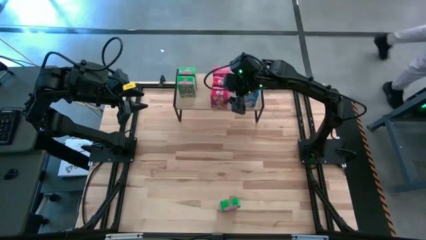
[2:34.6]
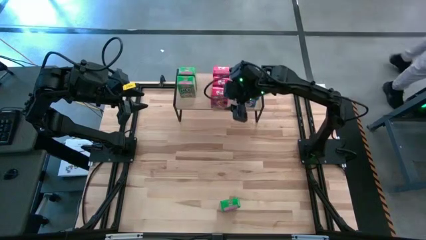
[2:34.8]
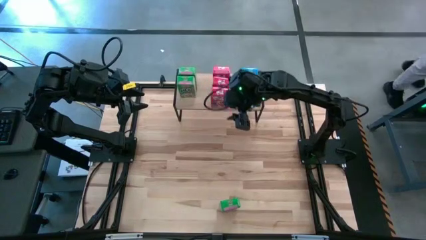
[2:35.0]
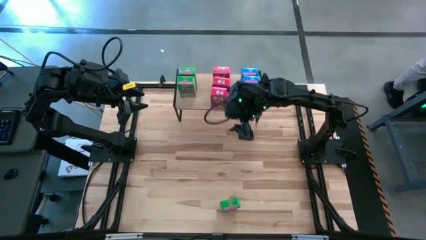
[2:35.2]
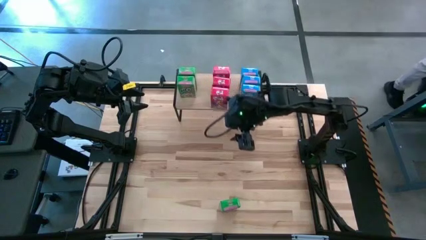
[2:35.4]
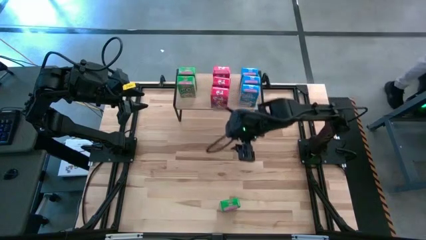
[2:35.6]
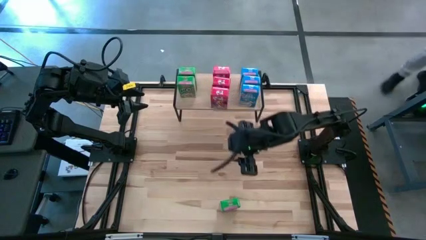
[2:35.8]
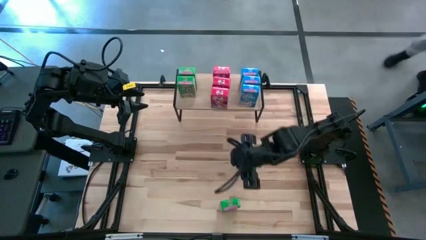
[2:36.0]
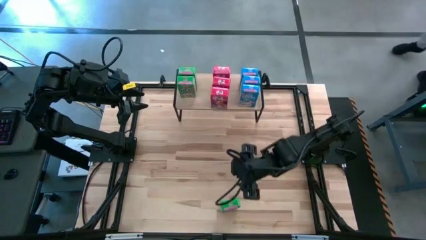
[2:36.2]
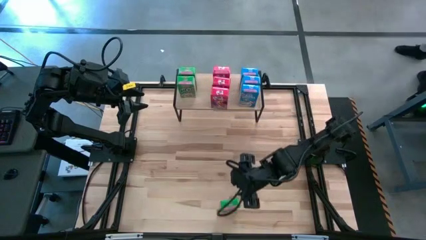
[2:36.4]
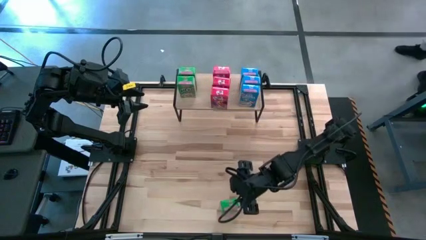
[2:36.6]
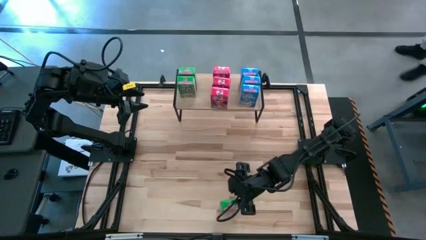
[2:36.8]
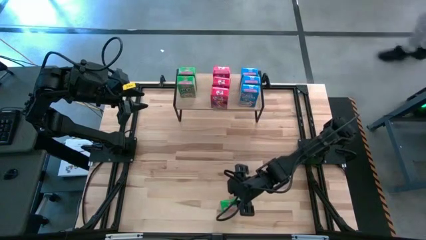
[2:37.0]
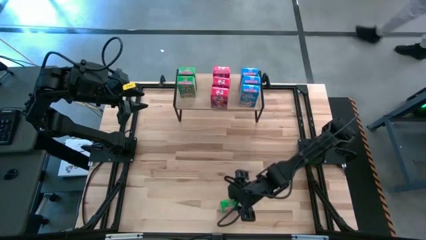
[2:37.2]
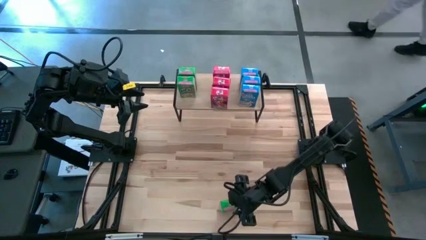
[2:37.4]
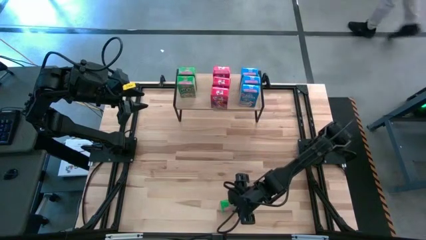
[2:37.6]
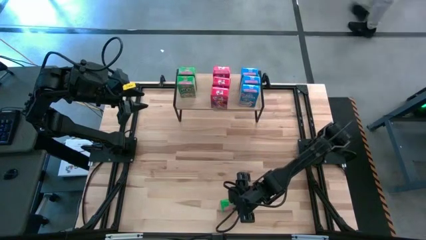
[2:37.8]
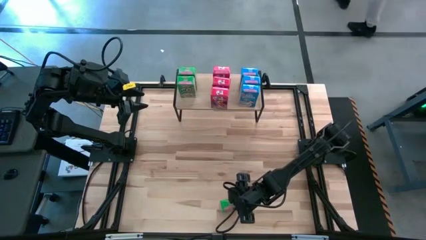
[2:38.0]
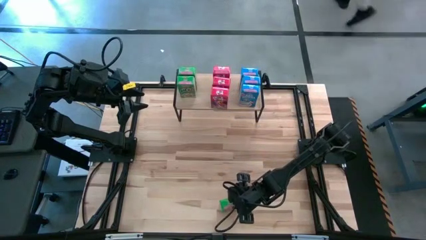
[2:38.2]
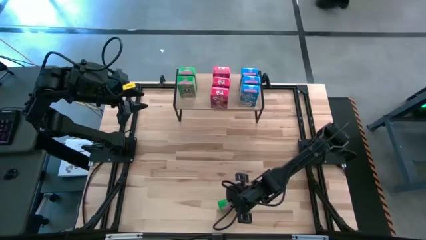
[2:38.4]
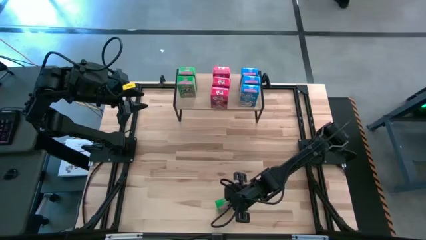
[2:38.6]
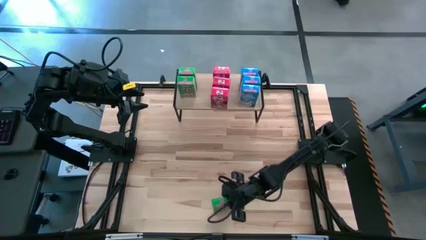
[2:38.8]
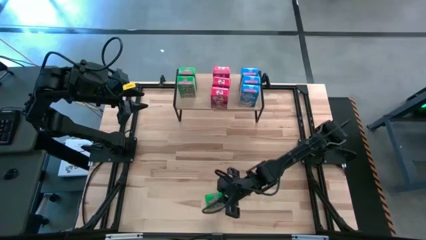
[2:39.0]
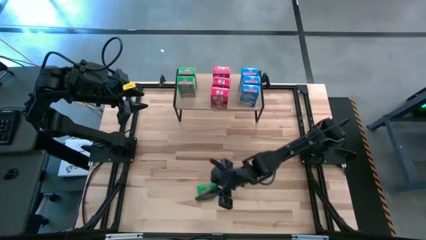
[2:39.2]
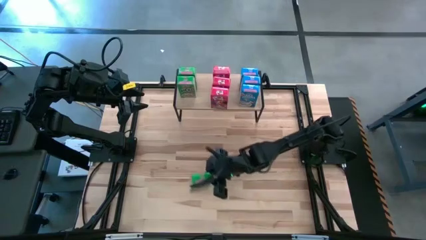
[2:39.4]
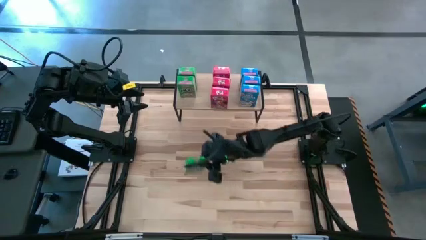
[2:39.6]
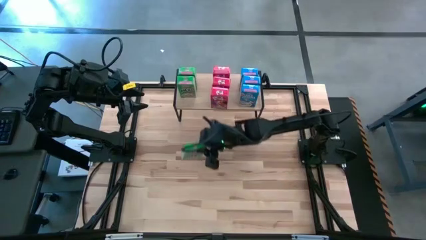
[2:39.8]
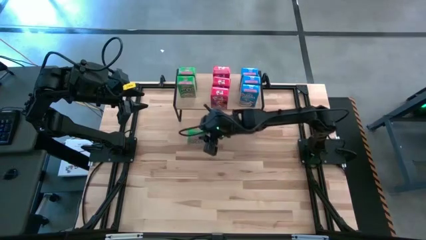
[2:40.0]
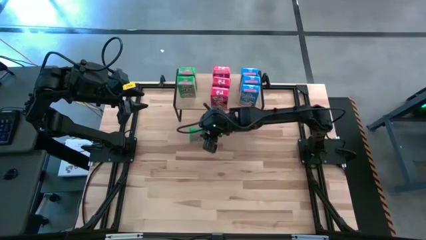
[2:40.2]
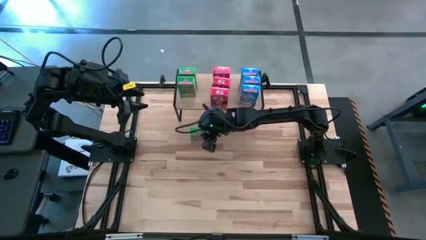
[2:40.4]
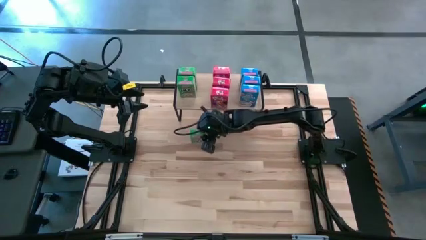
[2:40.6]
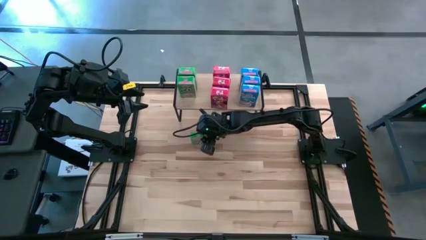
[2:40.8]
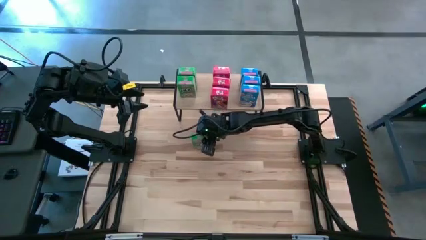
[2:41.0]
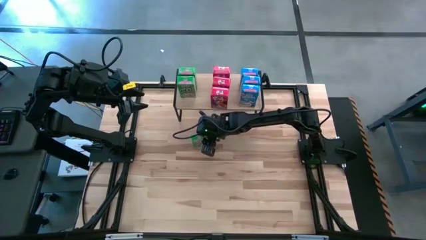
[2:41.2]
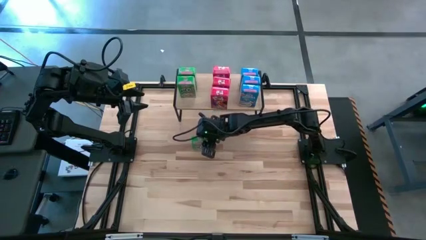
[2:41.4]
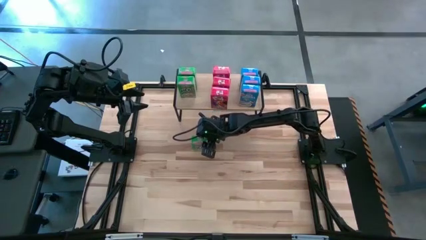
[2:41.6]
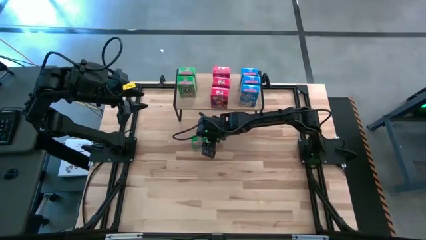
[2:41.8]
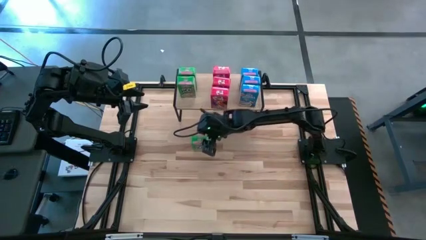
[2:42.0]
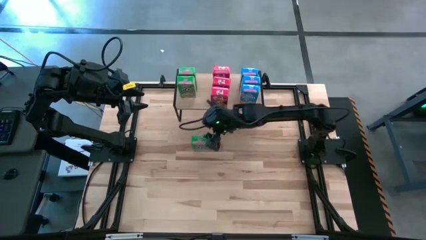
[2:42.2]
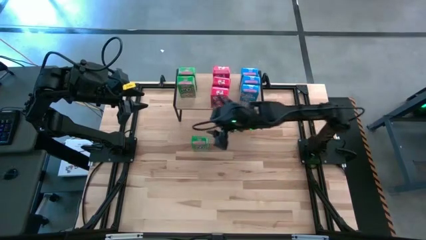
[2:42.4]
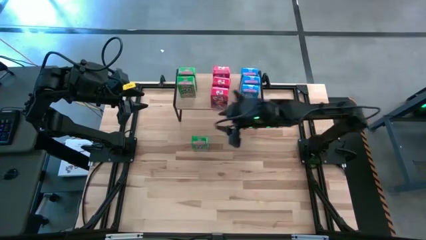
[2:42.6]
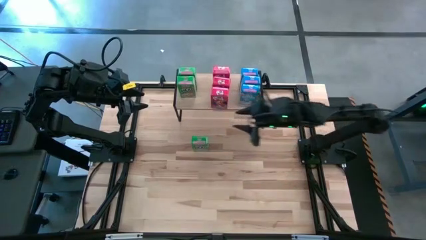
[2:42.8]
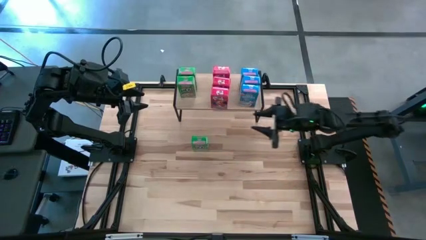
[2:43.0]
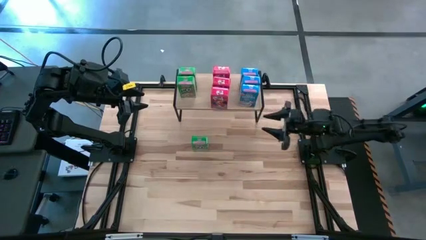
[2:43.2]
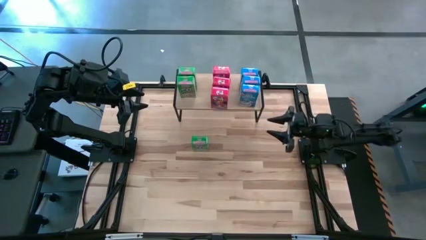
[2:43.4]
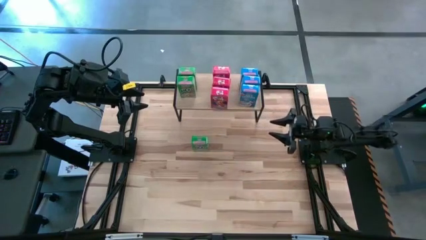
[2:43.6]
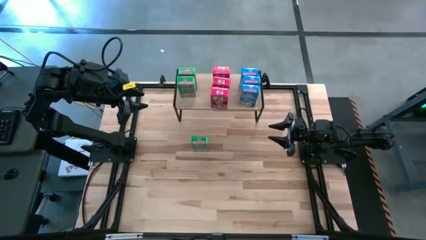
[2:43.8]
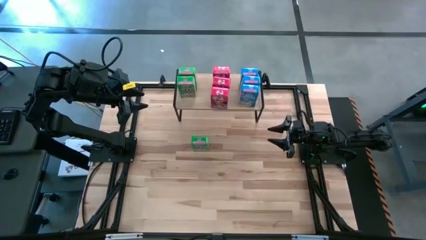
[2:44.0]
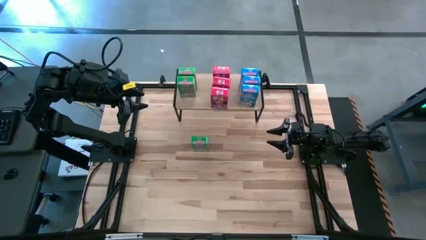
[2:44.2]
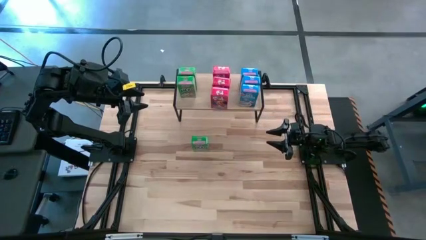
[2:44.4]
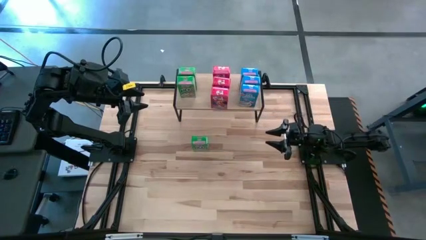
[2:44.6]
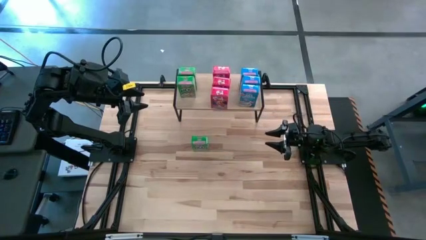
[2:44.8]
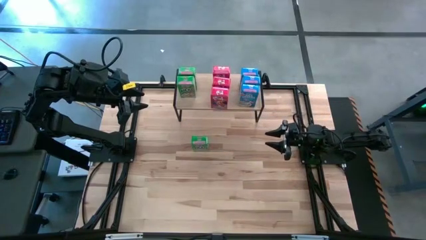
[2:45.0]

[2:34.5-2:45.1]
Task: Stack cereal on shelf
Put the green cereal box on the shelf aligned with the other green cereal boxes

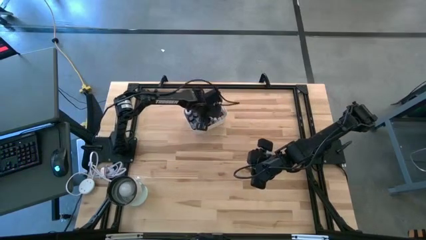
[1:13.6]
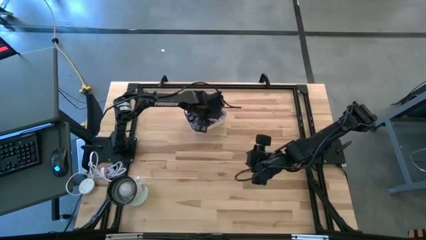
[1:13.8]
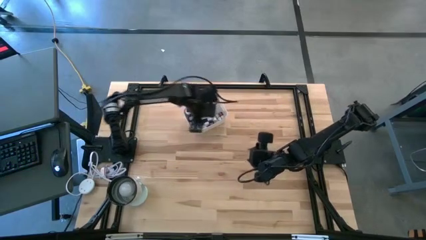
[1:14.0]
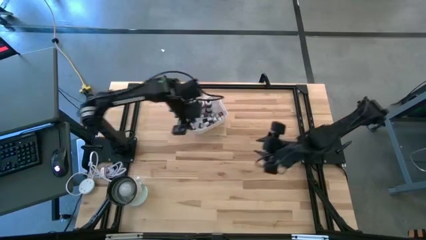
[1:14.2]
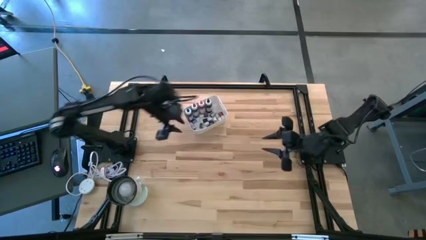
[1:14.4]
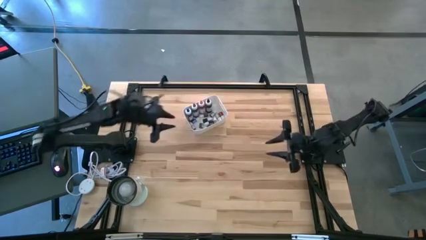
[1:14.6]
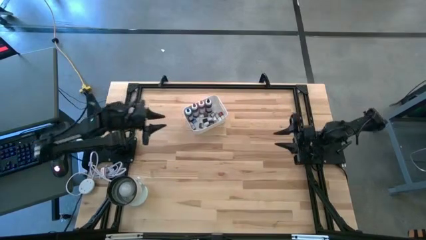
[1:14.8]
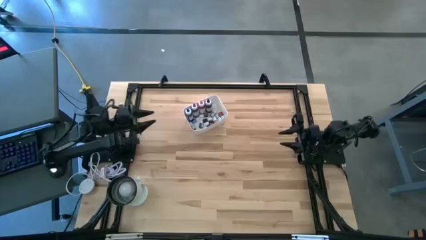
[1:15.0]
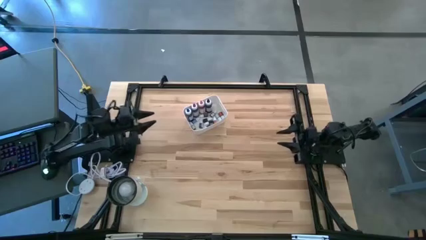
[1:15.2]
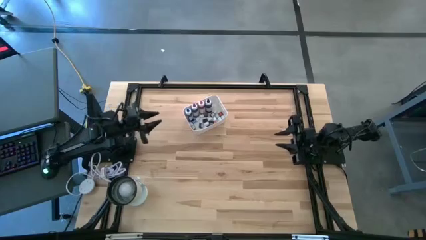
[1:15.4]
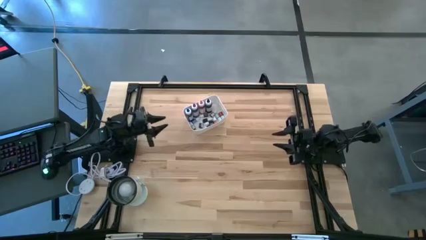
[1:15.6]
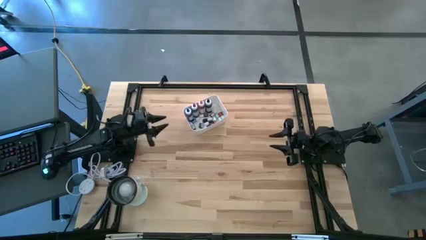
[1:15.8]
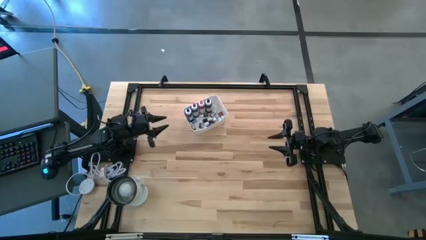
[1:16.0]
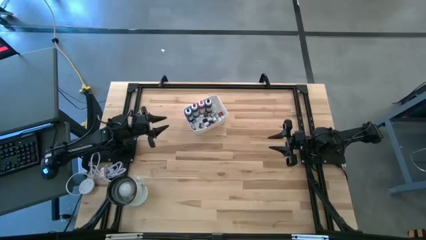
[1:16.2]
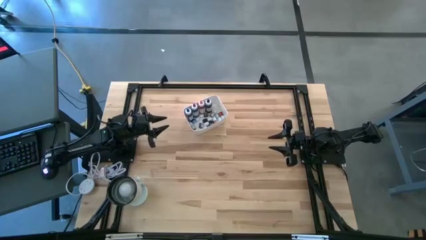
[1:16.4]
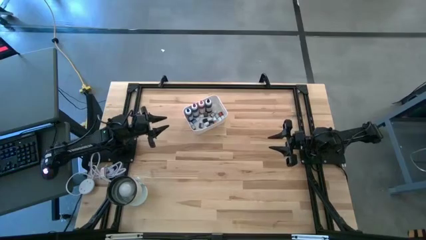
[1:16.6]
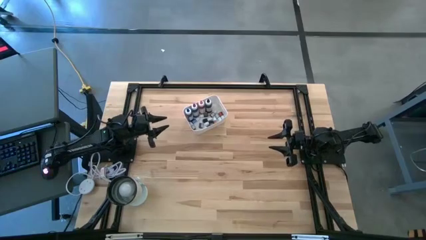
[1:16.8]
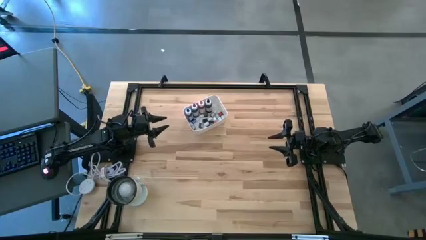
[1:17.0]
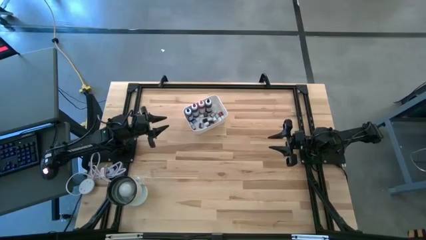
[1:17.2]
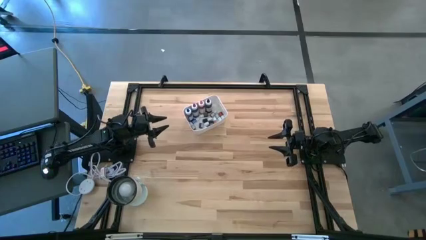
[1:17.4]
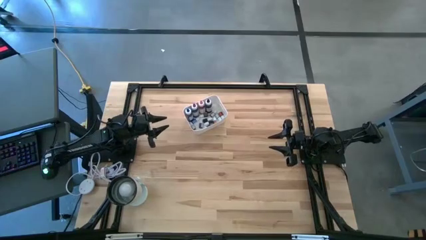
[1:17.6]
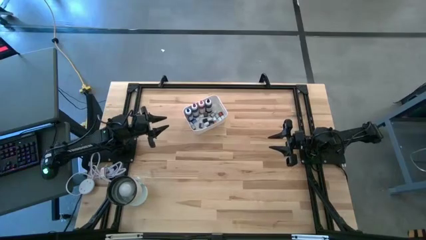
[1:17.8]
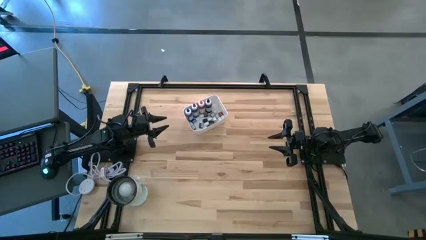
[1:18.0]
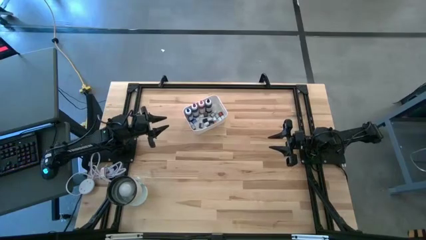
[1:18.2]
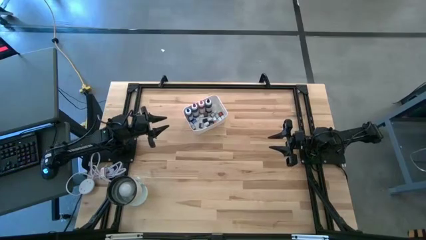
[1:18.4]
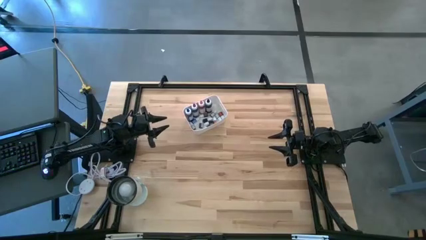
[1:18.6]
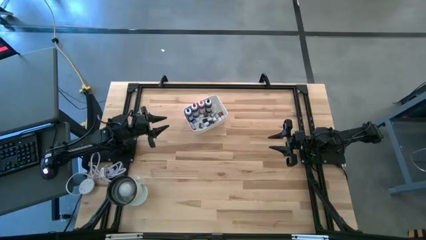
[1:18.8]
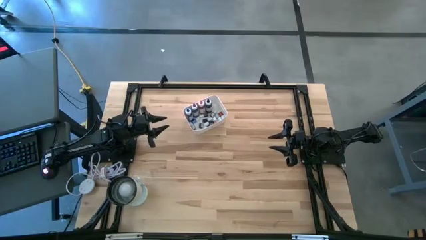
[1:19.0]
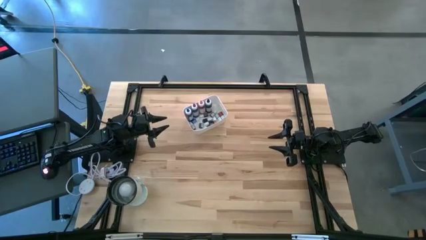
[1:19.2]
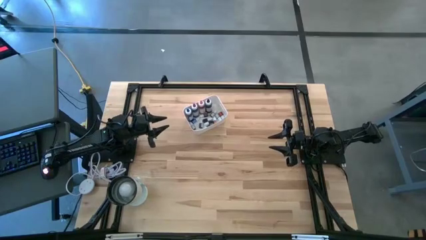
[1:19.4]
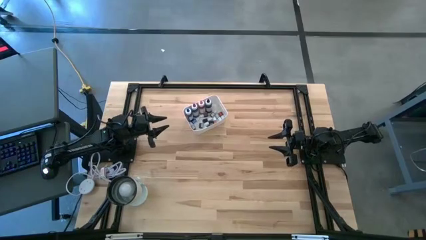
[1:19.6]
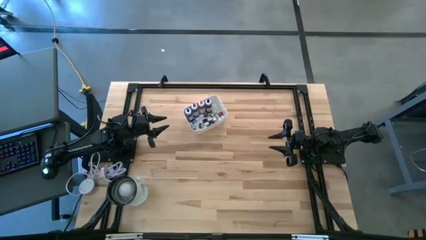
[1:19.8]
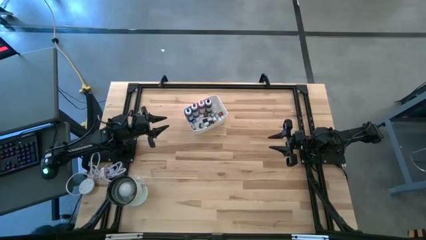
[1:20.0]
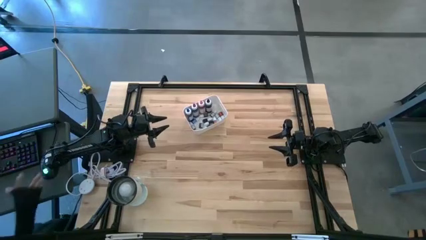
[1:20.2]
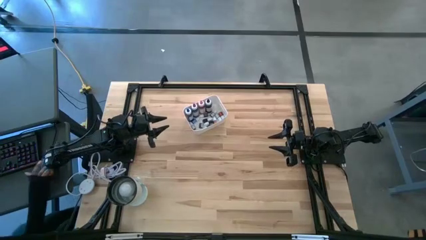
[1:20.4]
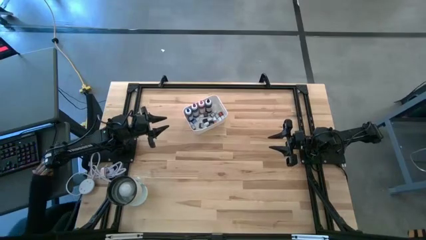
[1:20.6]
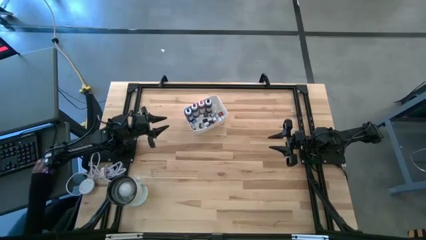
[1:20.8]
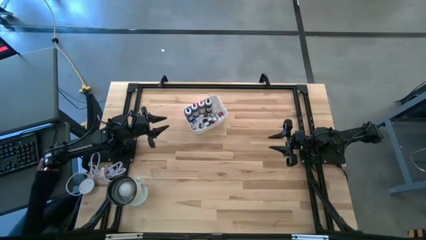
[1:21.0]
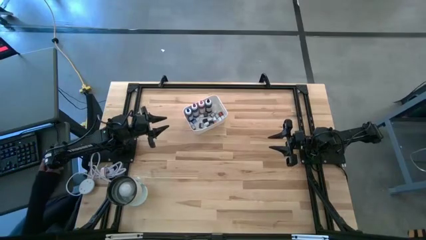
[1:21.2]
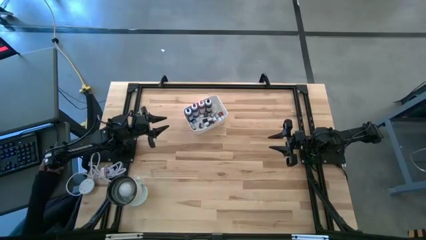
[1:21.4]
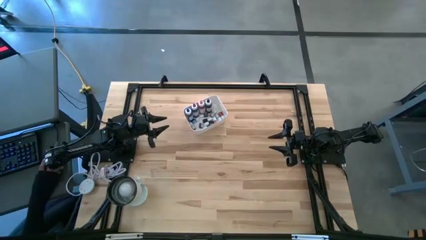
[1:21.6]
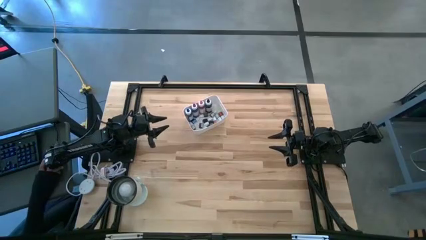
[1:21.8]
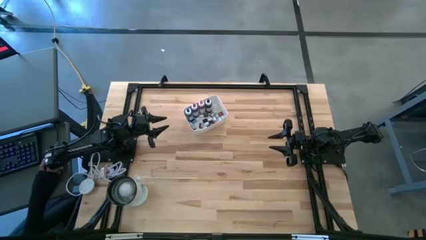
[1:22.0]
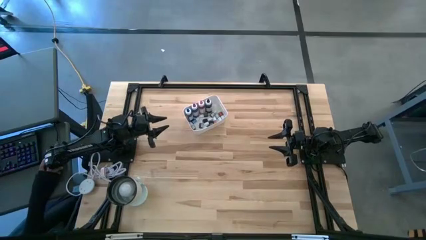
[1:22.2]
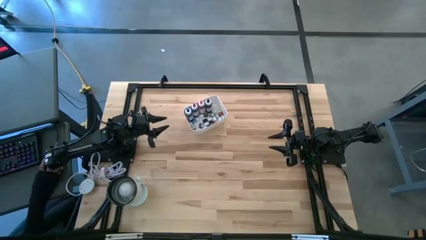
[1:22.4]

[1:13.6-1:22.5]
Task: Pick & Place food coloring
Return to Home Position
